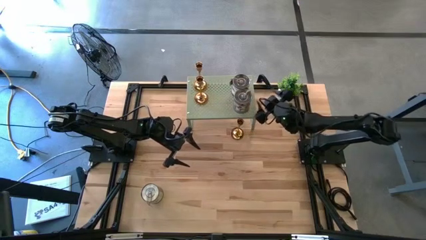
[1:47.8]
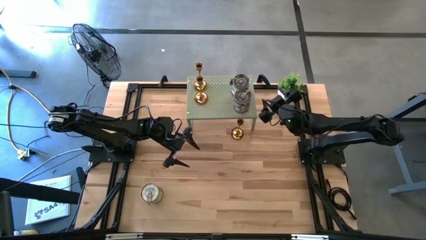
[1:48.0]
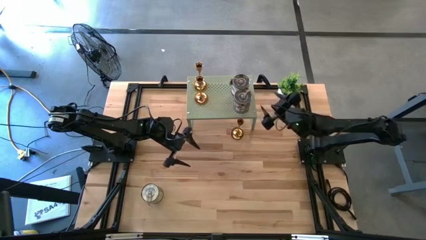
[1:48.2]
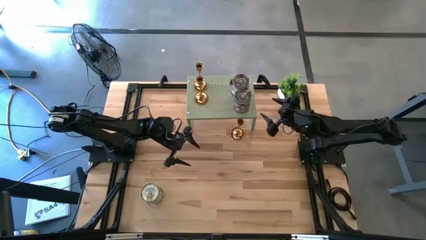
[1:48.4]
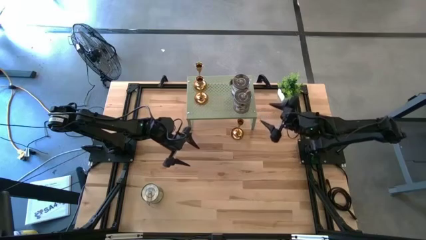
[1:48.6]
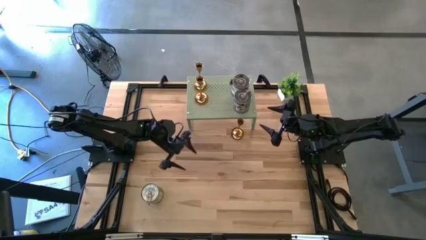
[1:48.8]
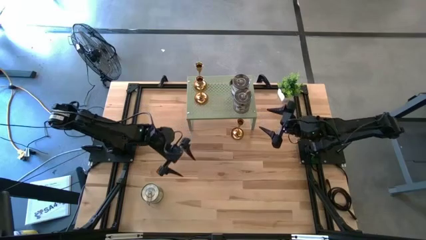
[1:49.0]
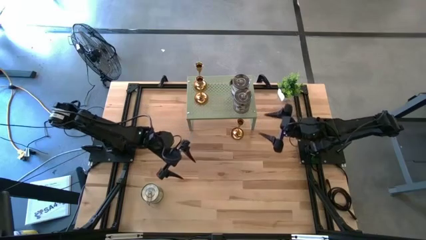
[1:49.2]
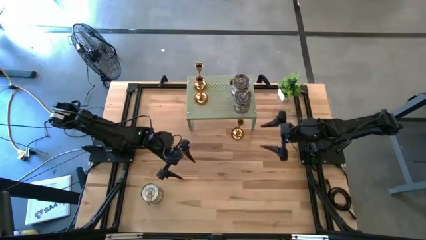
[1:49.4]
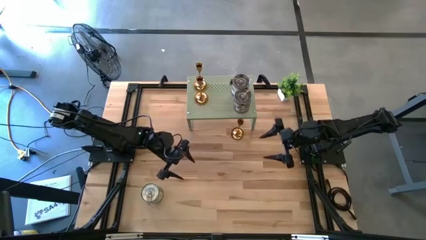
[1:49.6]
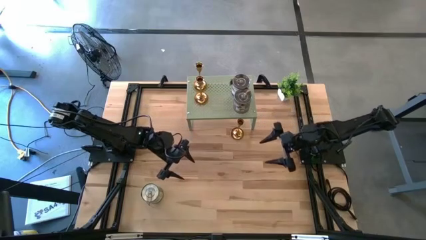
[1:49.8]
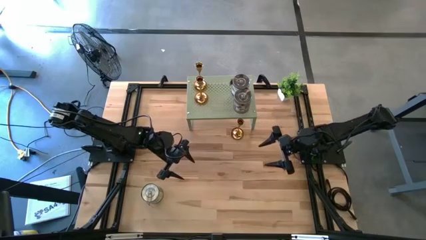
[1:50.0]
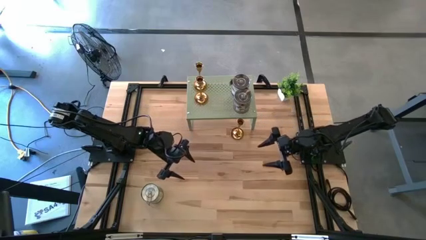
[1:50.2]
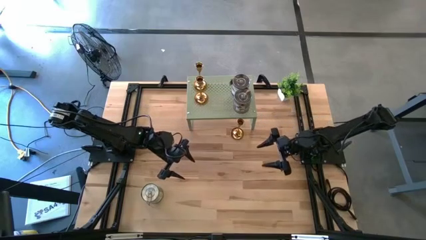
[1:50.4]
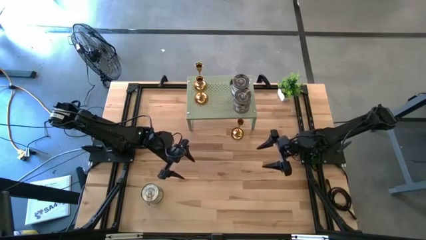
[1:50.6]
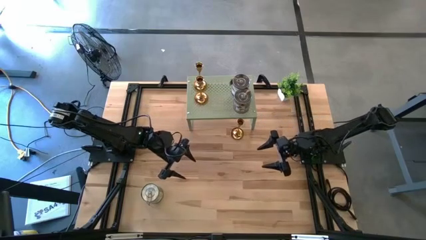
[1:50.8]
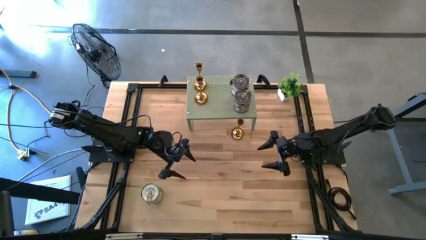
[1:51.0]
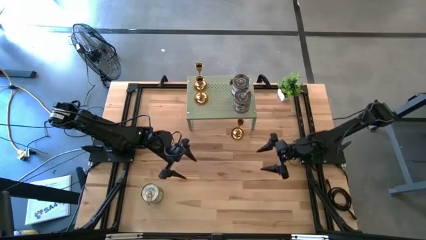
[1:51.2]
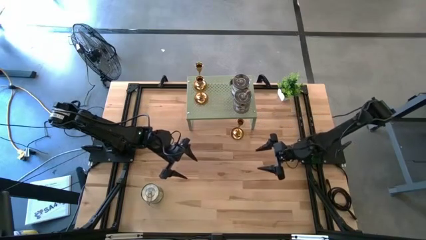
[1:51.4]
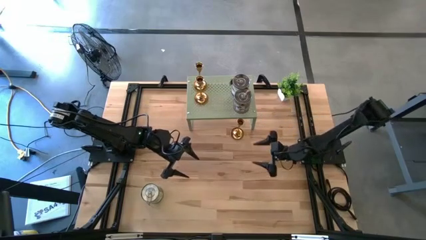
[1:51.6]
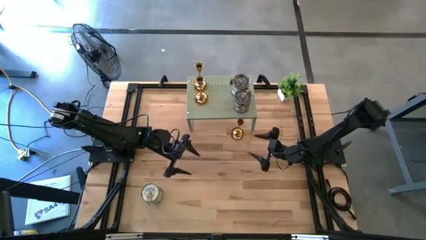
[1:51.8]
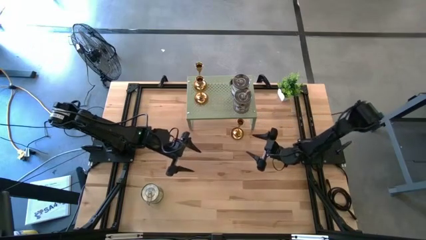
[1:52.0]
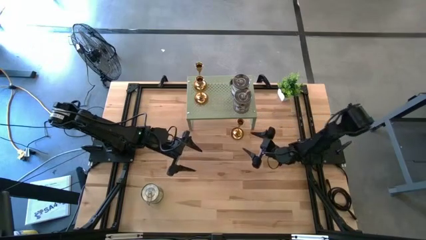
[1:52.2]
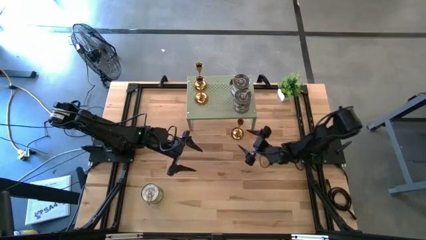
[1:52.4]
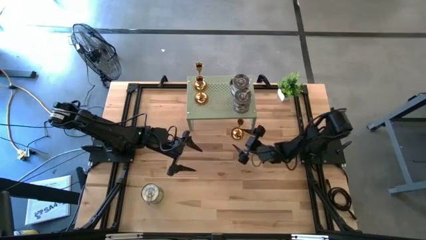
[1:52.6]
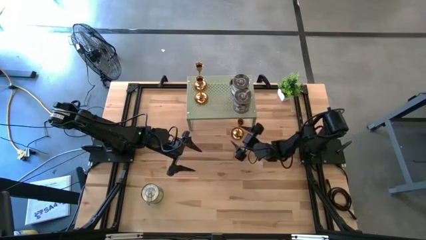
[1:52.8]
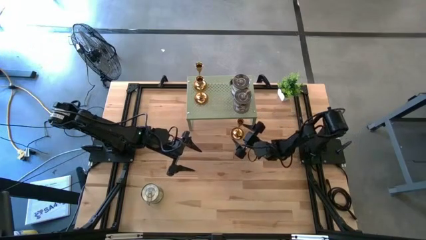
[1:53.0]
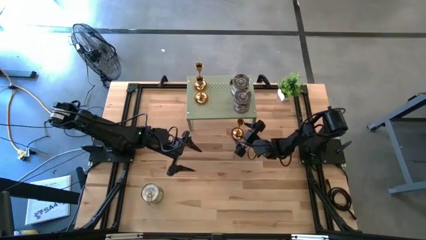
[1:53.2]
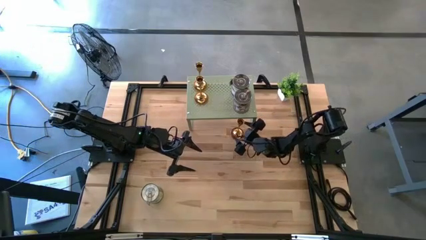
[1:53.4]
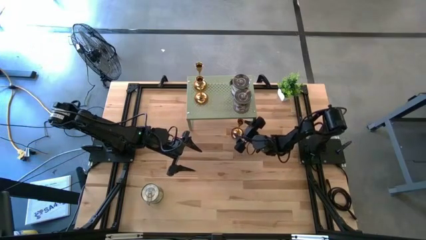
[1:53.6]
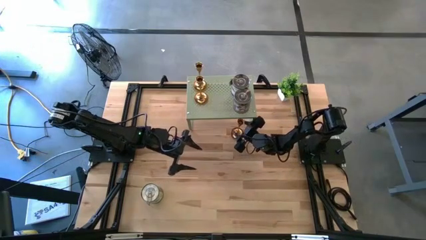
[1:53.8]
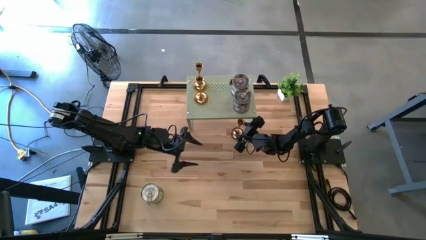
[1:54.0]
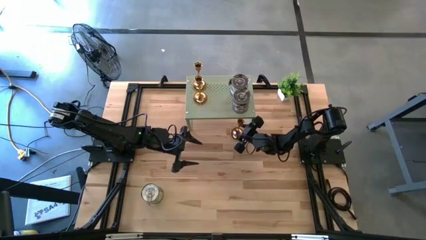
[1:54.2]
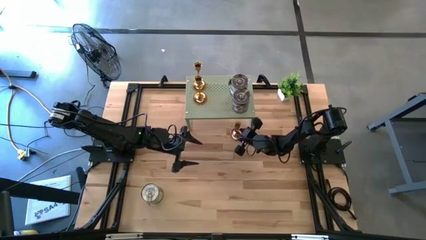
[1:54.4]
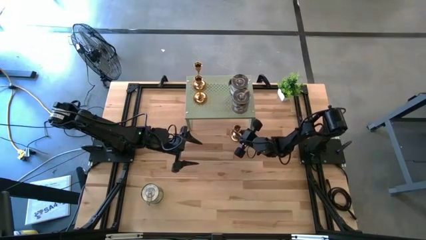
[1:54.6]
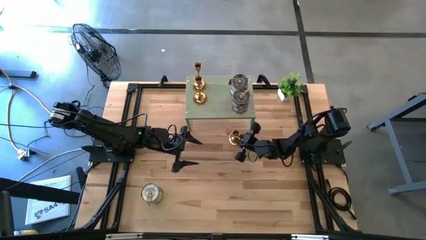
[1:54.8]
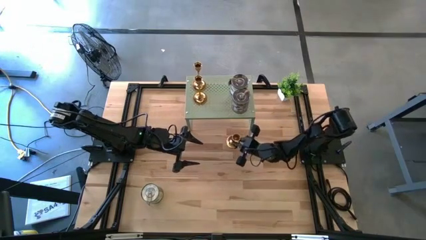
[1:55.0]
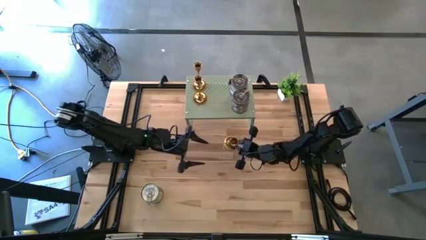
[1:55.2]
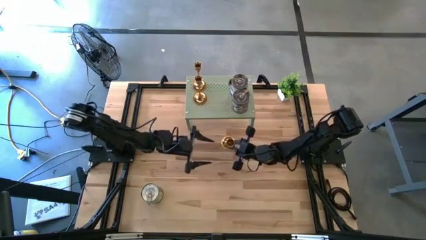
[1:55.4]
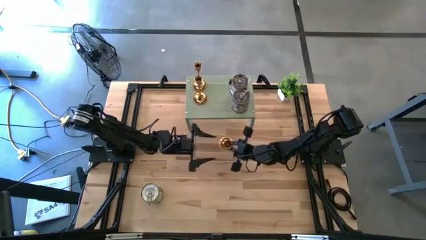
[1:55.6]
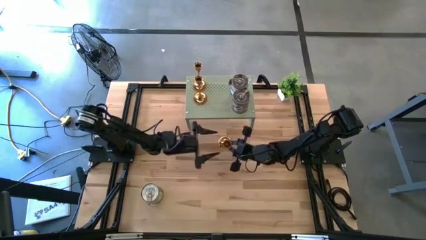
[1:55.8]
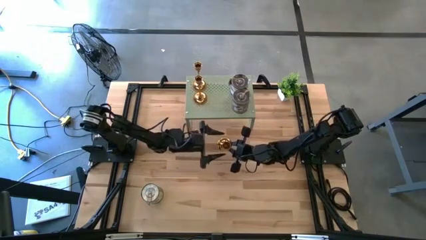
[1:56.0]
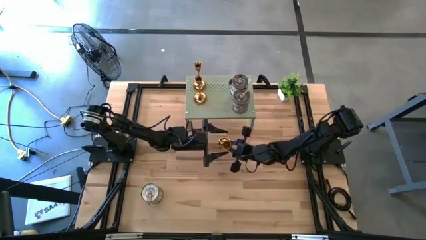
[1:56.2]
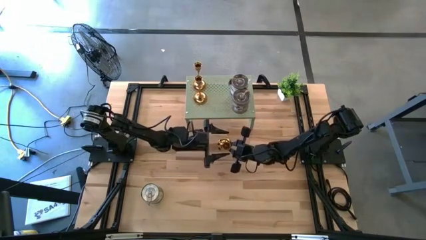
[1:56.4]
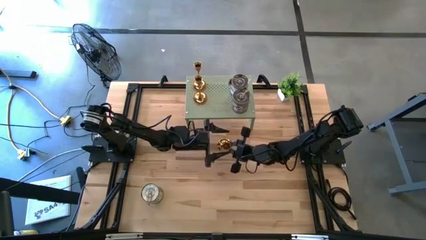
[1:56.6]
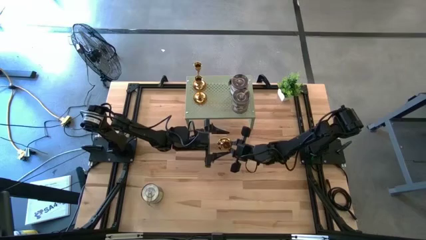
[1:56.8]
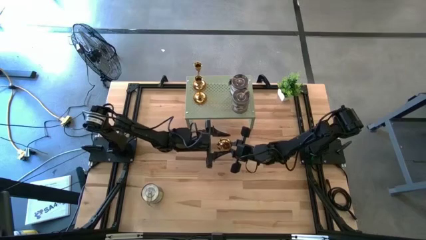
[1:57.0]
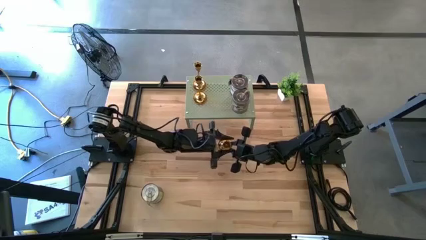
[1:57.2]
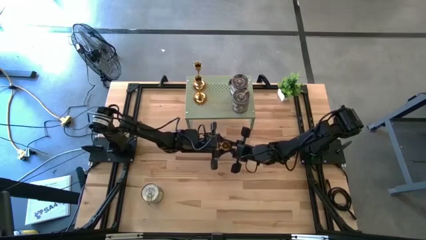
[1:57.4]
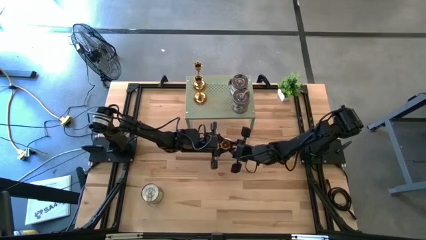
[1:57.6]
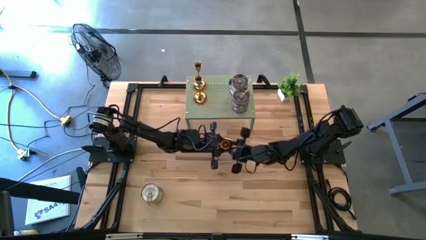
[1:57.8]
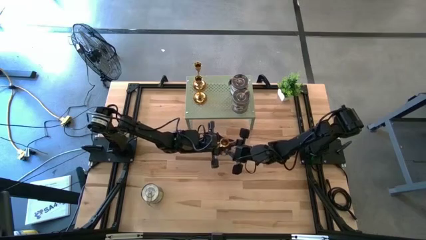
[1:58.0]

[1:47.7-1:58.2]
Task: Pick & Place candle stick holders
Put the gold candle holder on the shelf aligned with other gold candle holders

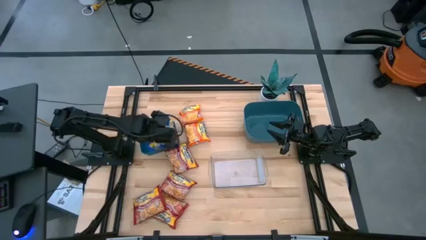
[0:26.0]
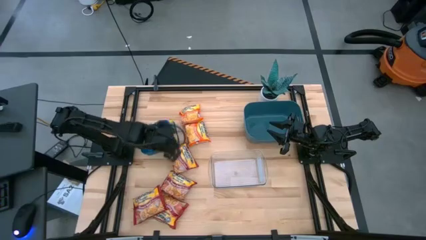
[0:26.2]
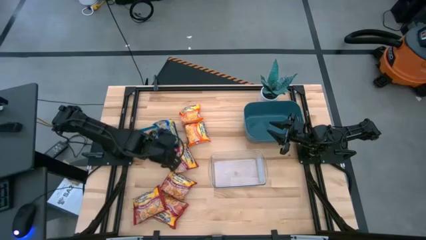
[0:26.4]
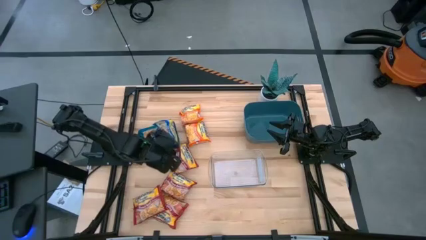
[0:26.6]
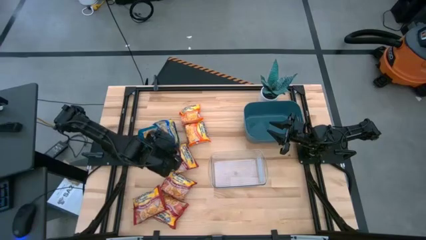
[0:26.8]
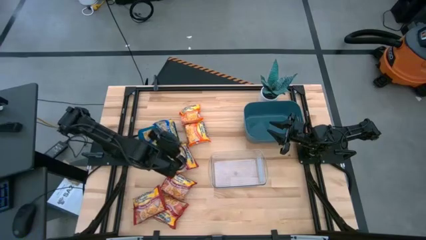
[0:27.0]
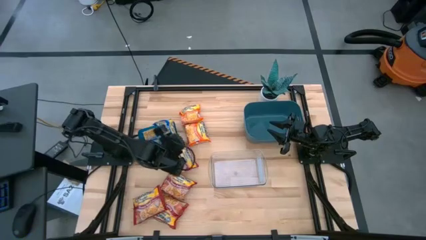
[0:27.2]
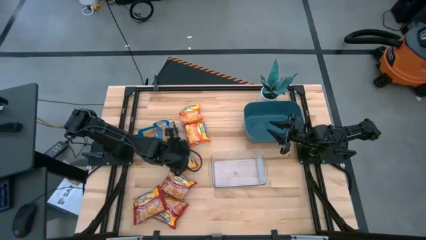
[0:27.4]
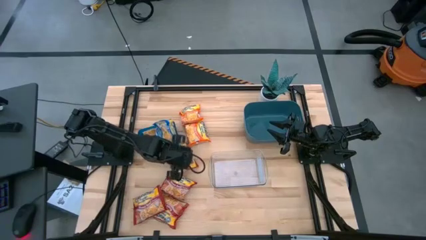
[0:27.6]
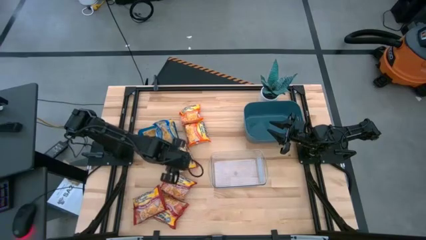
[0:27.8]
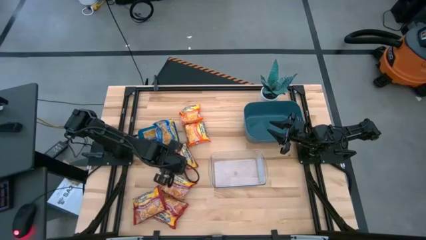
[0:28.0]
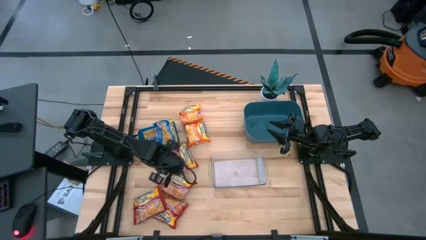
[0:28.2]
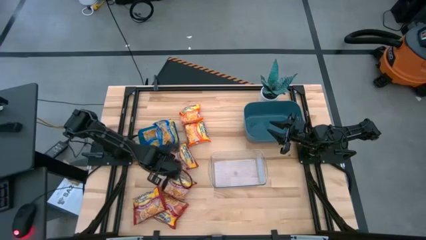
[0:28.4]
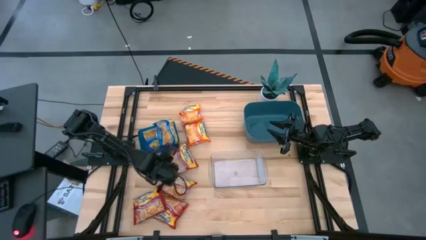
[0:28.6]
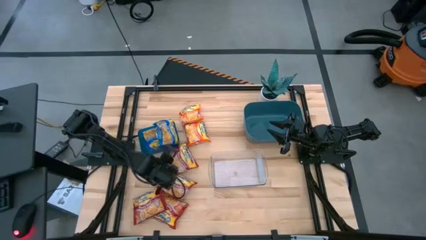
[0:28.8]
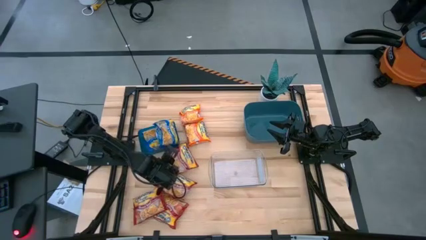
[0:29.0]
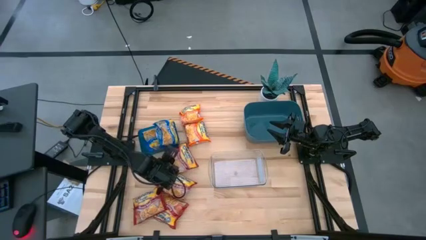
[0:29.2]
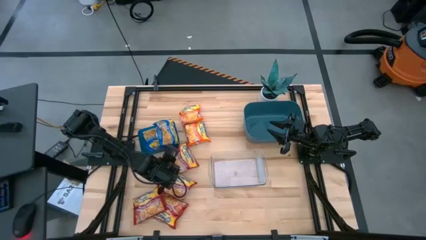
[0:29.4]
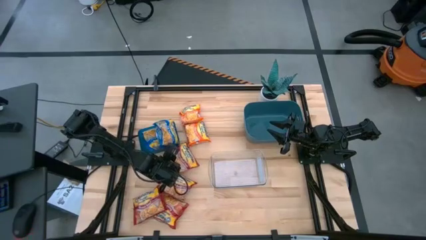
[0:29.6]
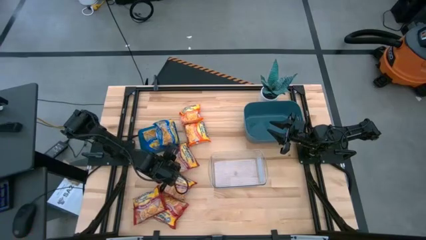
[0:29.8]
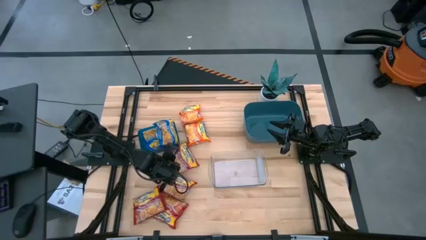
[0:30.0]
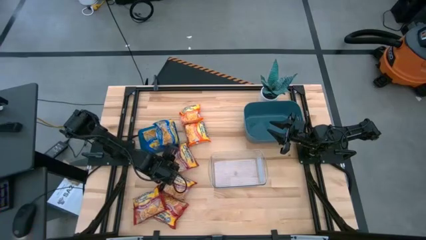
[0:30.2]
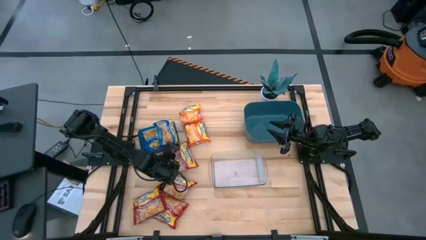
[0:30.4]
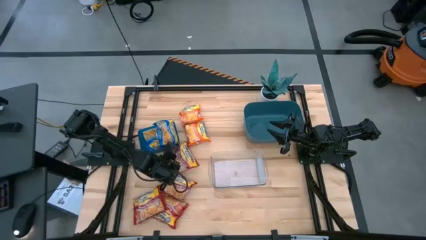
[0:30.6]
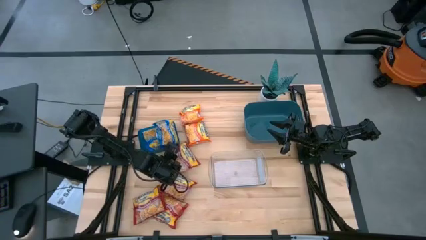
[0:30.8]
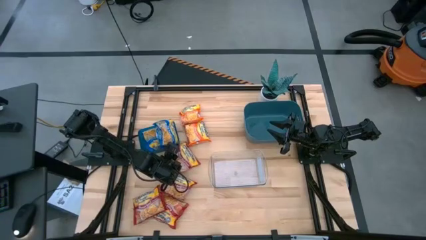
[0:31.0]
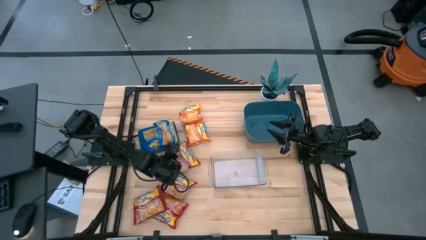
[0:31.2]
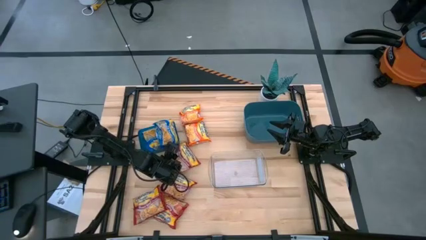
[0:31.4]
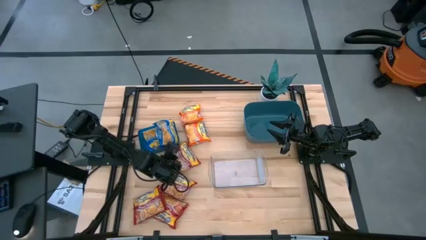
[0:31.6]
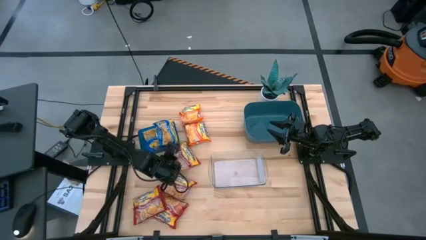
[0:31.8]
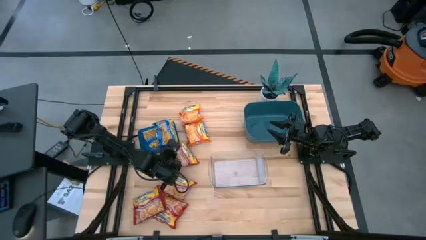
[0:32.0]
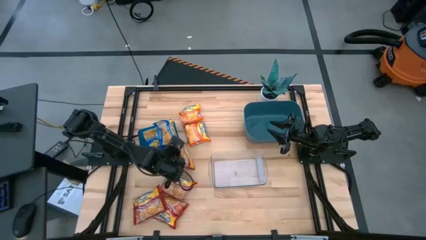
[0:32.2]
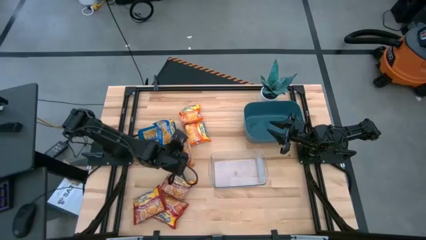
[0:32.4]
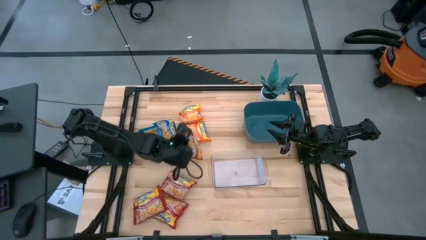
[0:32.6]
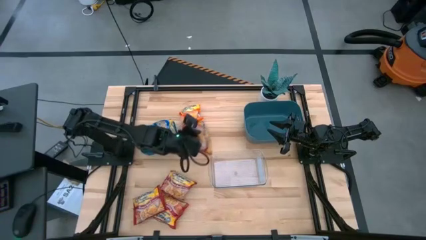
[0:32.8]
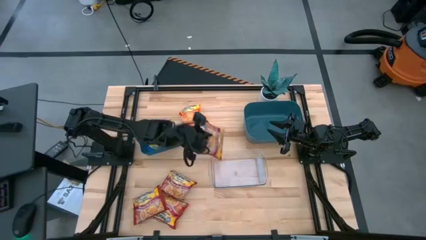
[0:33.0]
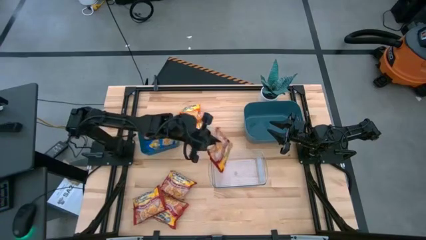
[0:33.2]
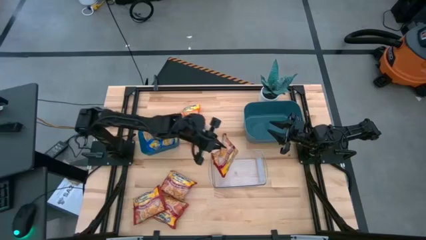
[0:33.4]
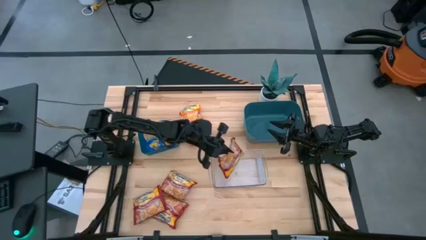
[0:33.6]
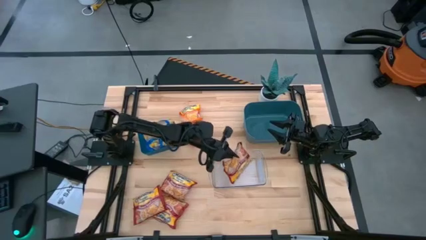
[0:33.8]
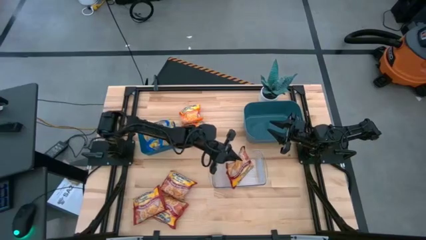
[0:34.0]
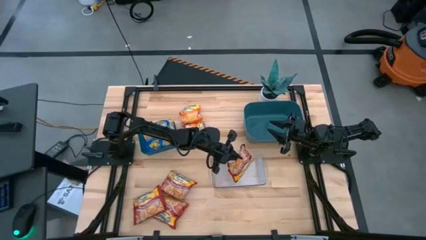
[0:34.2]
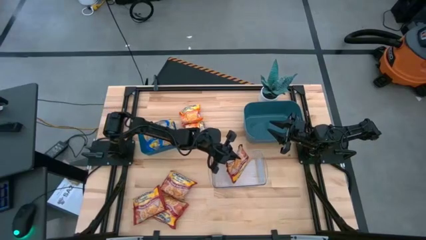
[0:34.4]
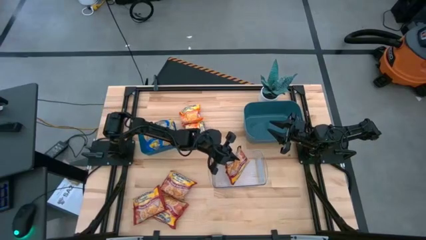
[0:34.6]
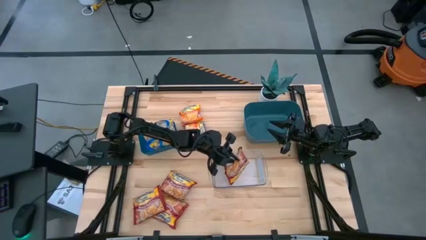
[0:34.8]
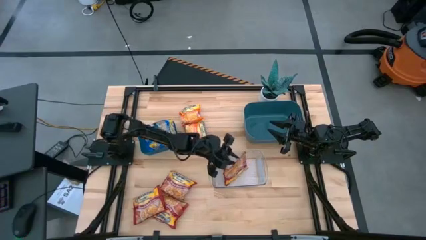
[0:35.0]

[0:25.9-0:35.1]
Task: Sort Maruchan noodles
Put the red noodle pack into the transparent bin
